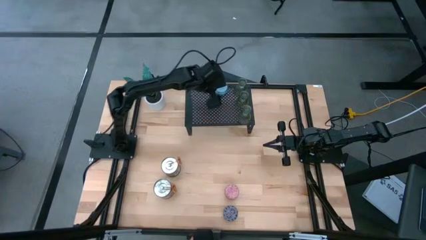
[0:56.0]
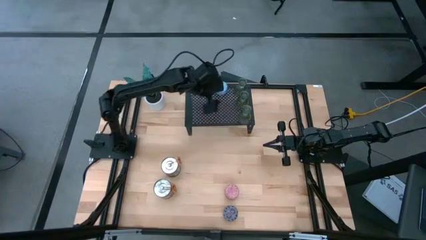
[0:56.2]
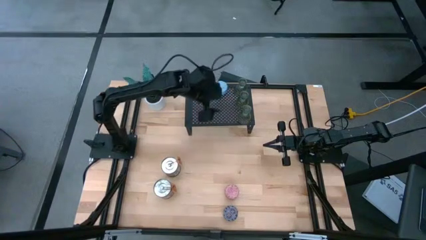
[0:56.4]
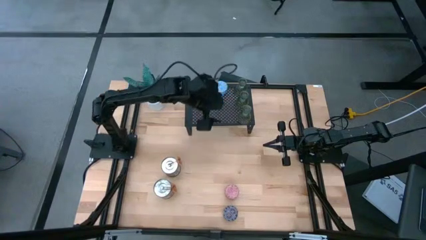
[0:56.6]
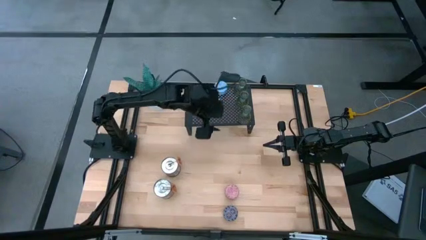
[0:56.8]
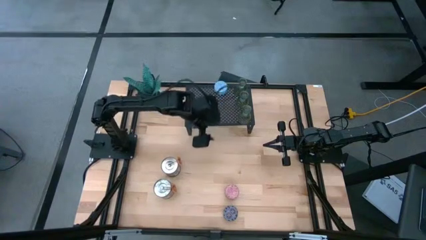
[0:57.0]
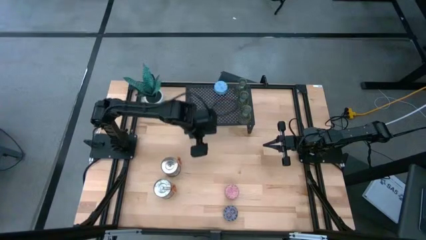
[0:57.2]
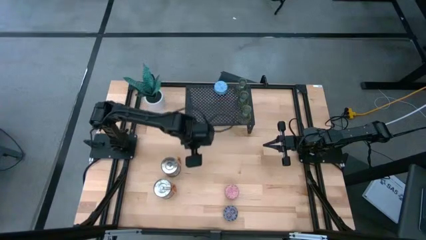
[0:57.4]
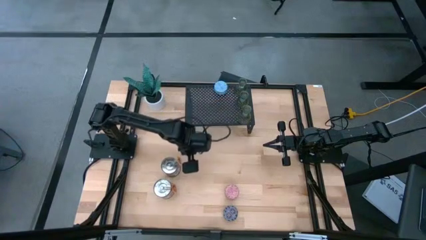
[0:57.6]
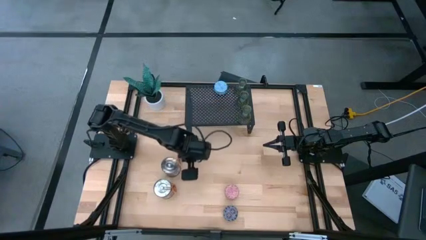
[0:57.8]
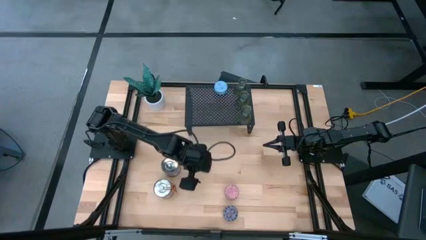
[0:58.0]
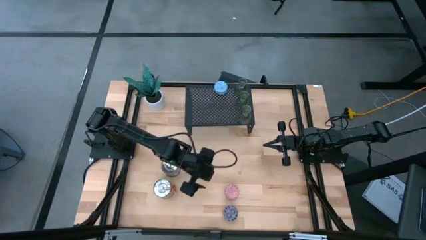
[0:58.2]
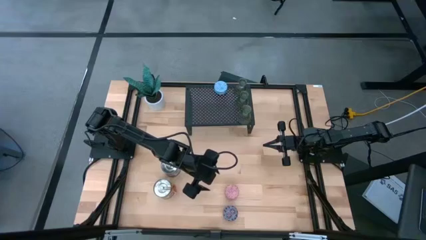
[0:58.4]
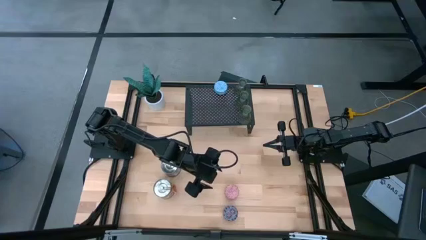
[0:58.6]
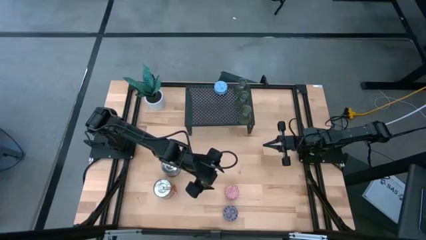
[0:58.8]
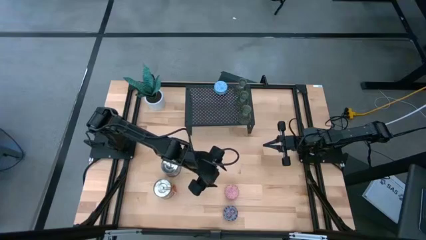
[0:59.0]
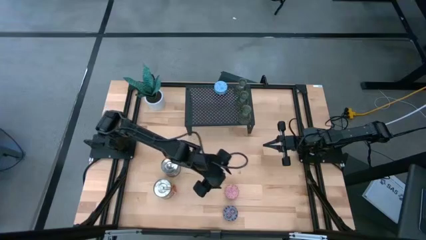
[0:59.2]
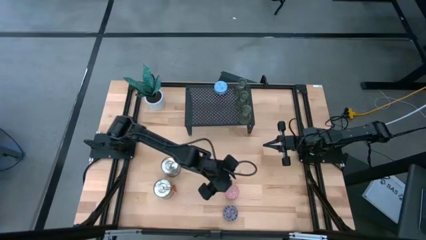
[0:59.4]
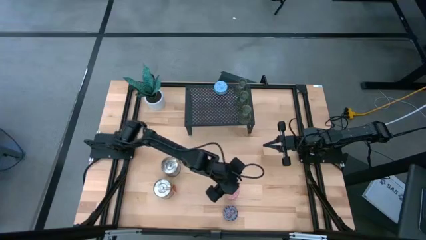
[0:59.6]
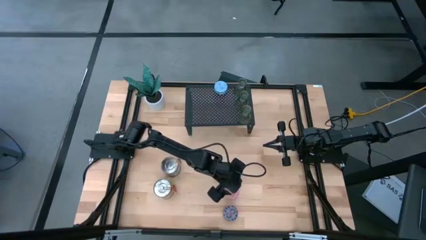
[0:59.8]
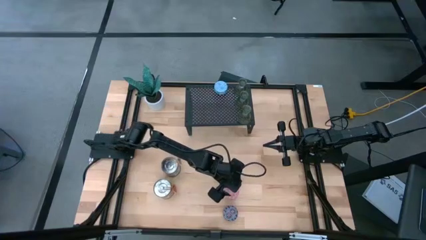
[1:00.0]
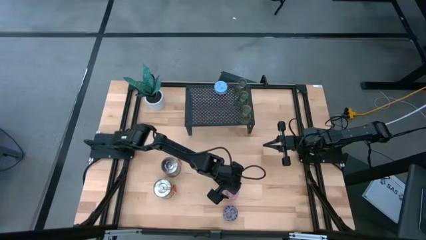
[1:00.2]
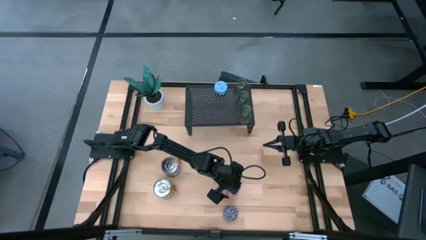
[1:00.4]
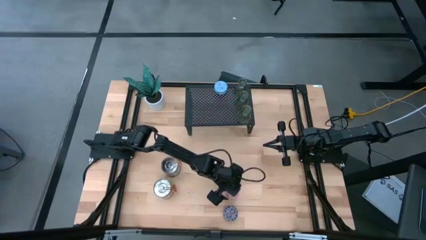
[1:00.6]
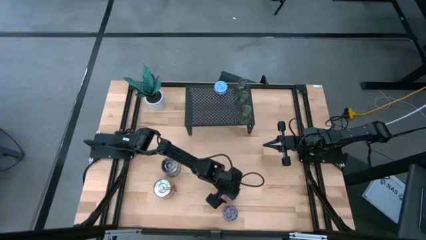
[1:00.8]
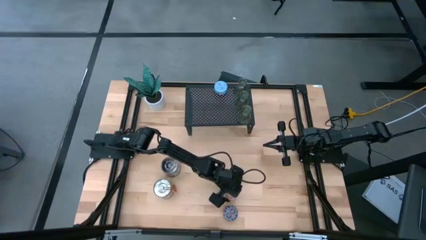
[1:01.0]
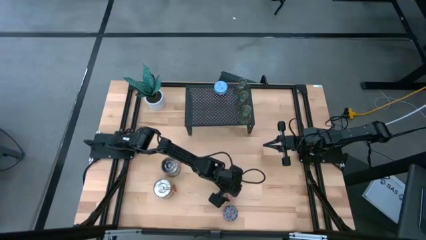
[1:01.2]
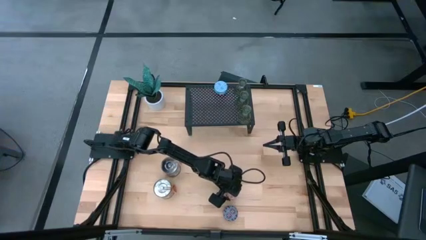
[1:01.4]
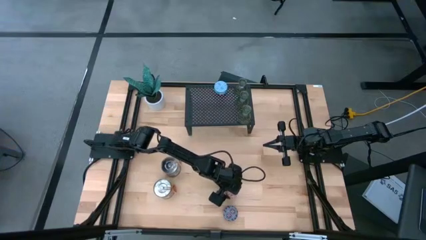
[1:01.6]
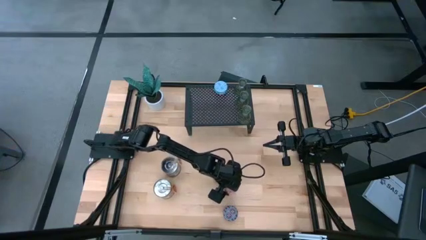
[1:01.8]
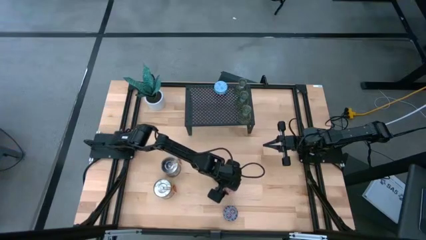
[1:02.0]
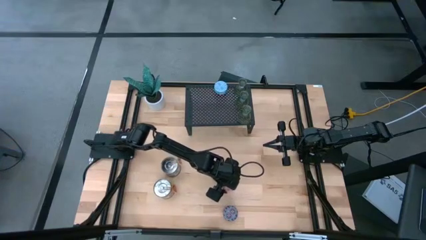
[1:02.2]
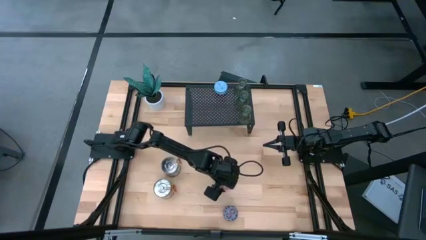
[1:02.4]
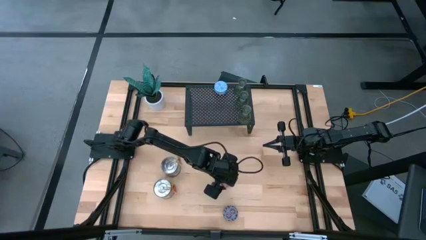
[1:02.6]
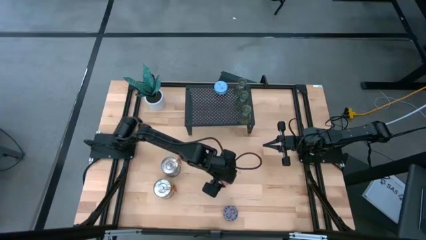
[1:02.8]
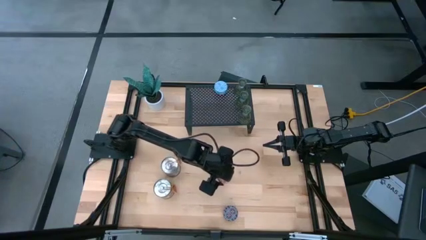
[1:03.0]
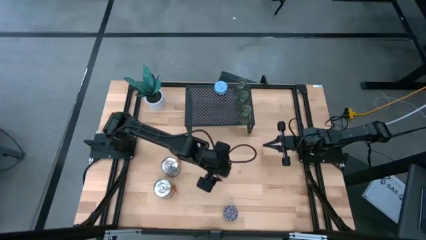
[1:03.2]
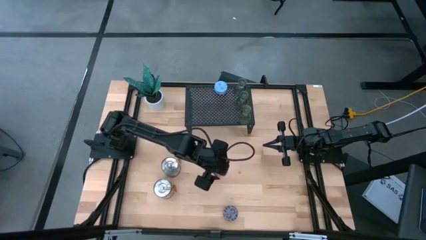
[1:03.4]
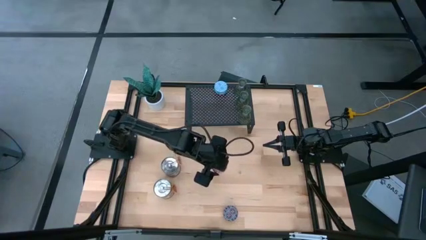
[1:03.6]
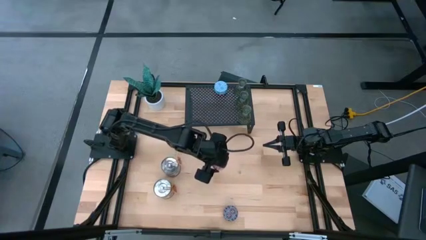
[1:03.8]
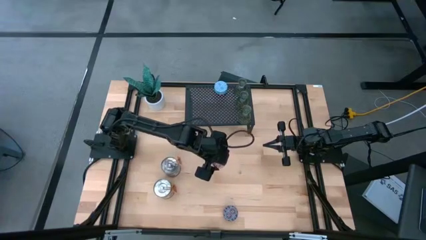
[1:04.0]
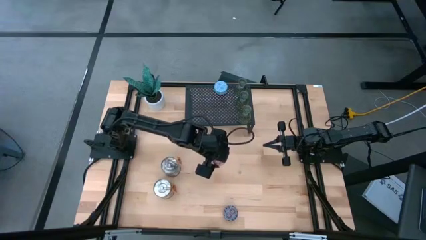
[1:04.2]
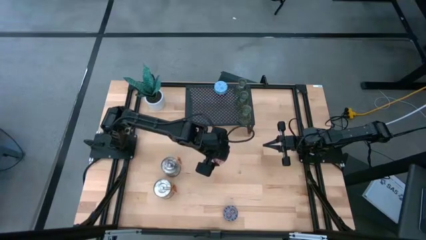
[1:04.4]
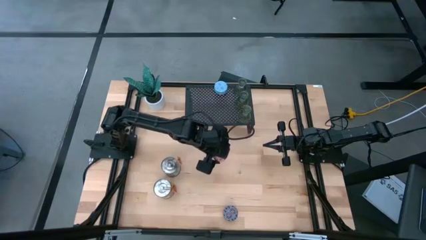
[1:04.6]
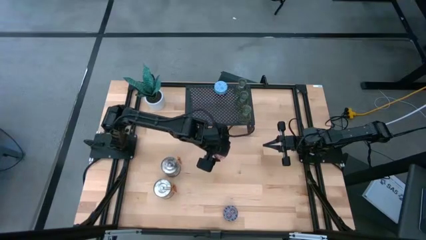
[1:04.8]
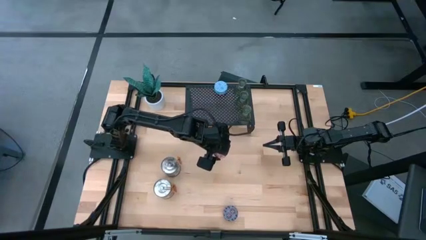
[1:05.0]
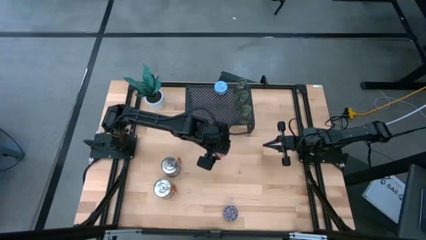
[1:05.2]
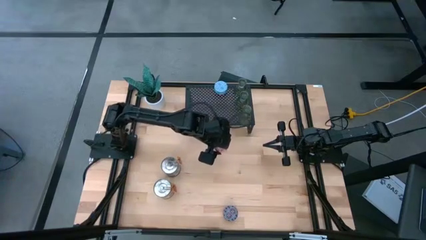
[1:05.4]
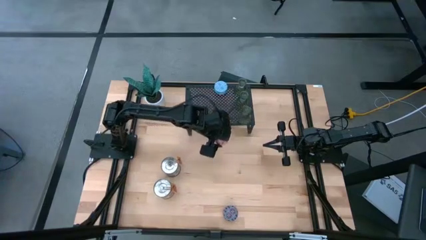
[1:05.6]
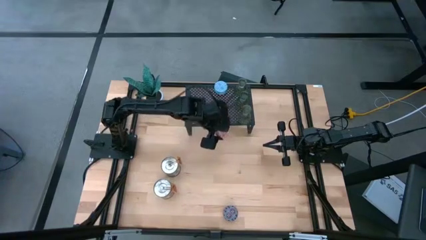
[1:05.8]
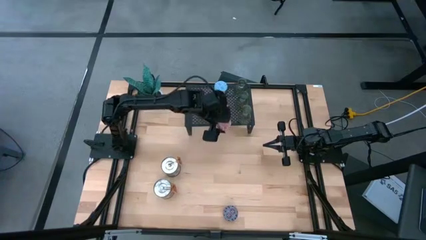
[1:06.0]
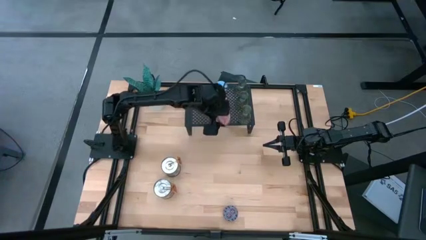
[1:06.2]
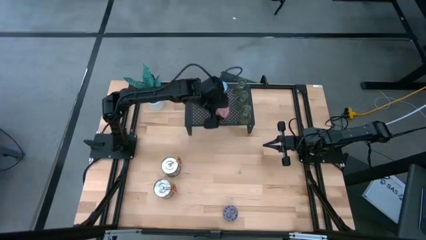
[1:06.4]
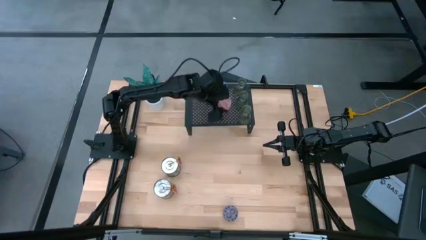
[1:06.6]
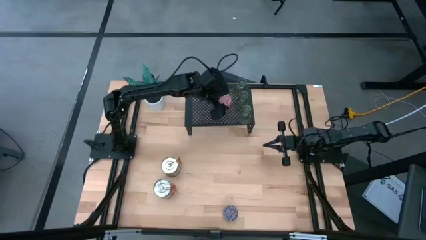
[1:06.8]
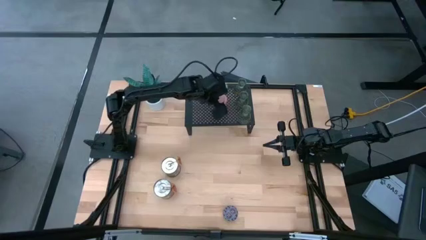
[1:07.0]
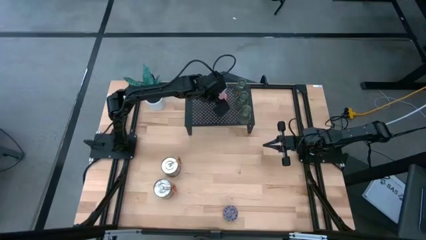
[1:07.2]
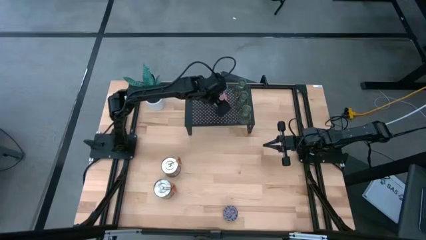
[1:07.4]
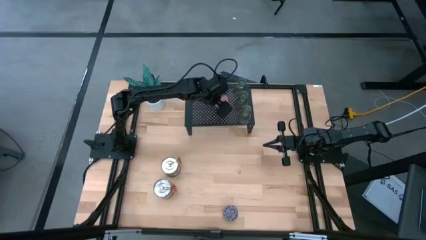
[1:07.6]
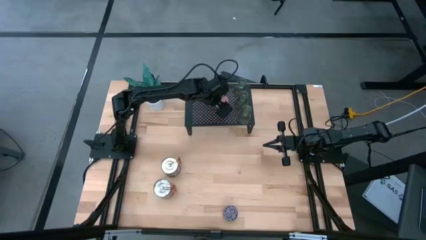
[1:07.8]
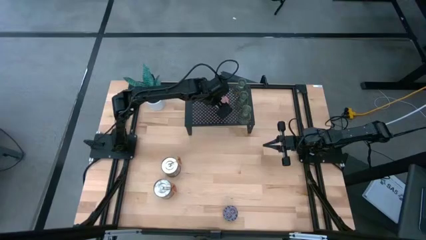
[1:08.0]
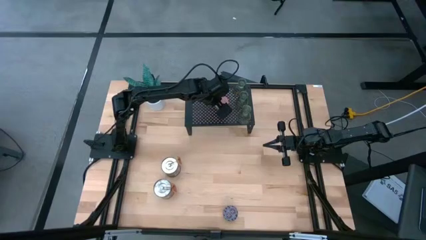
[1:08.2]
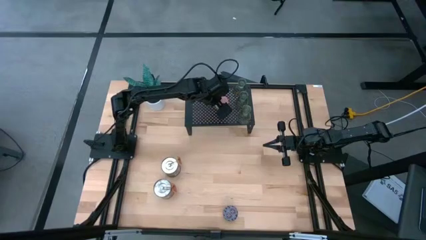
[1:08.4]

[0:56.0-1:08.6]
Task: Pick & Place candle stick holders
Put the pink scented candle on the shelf
